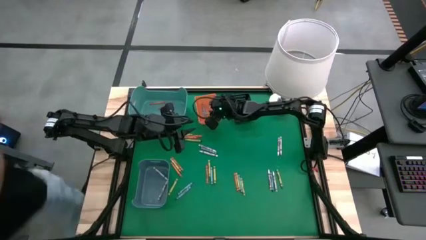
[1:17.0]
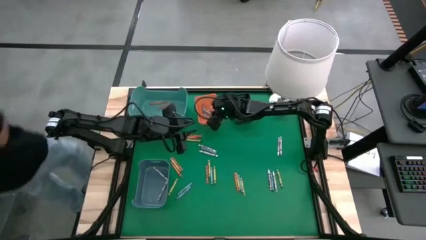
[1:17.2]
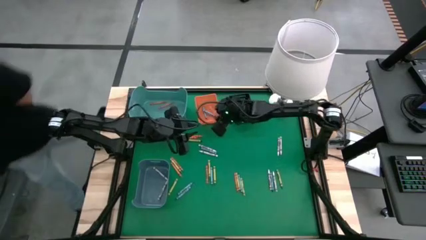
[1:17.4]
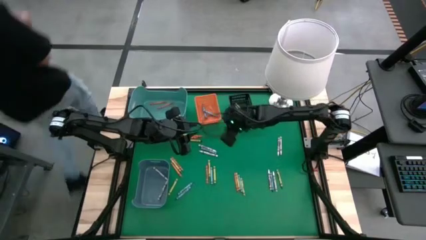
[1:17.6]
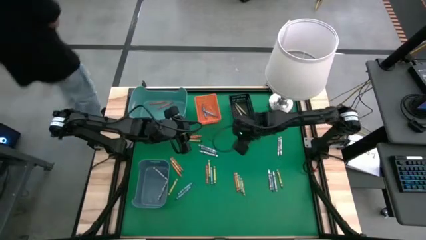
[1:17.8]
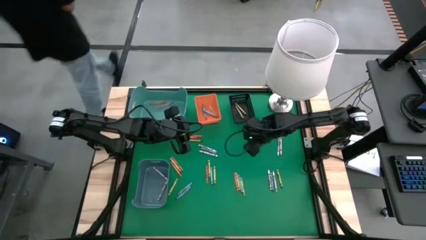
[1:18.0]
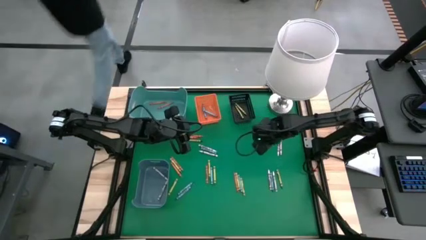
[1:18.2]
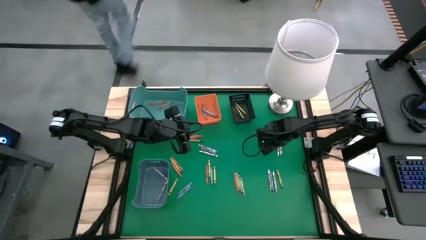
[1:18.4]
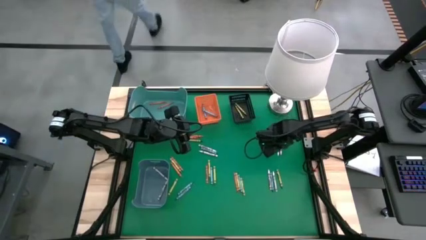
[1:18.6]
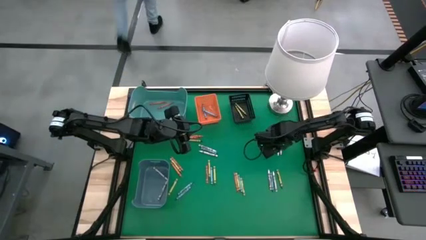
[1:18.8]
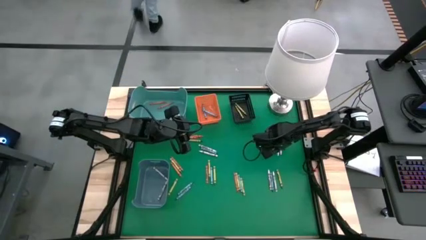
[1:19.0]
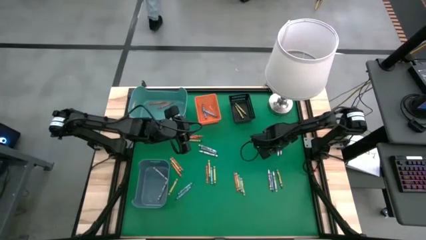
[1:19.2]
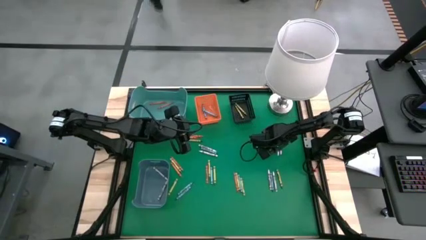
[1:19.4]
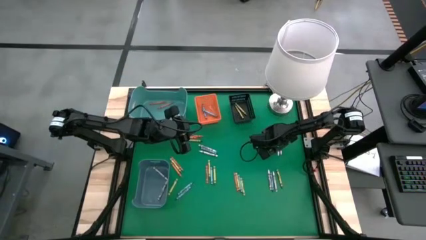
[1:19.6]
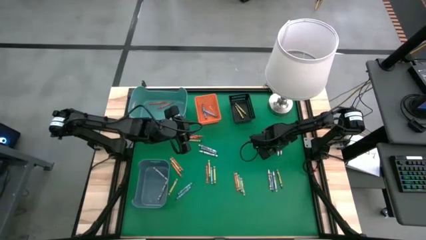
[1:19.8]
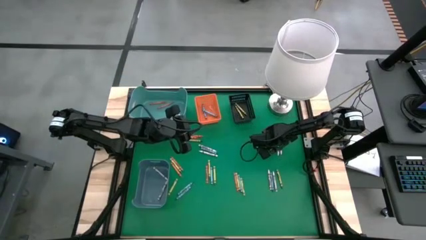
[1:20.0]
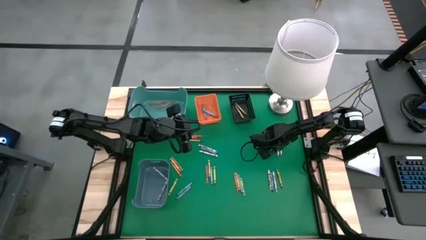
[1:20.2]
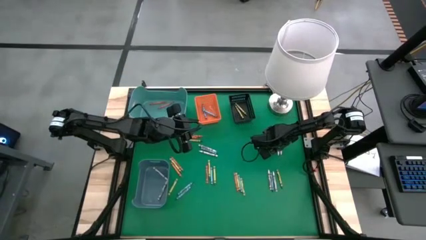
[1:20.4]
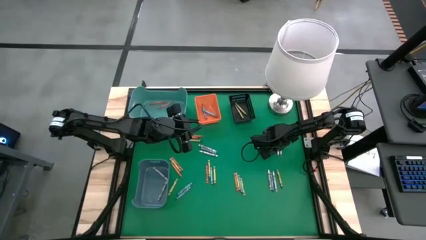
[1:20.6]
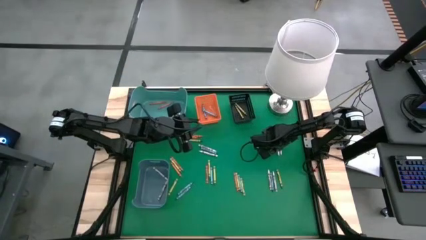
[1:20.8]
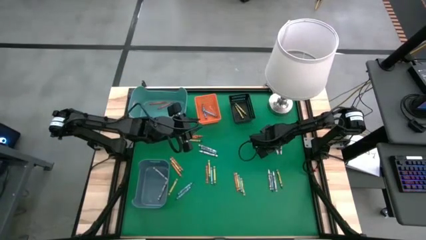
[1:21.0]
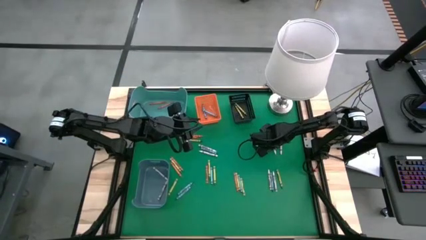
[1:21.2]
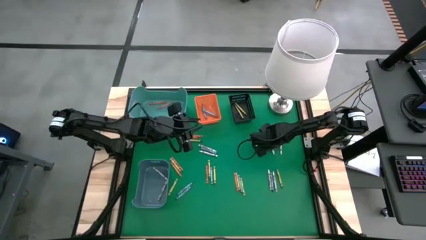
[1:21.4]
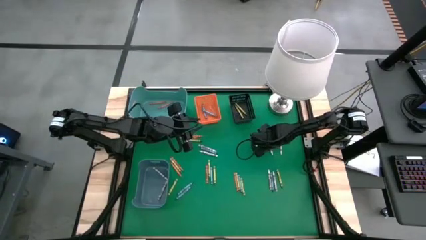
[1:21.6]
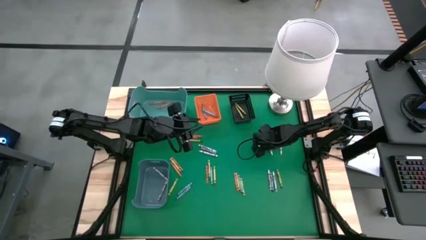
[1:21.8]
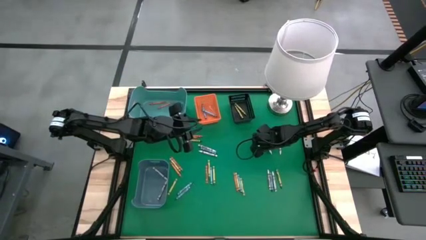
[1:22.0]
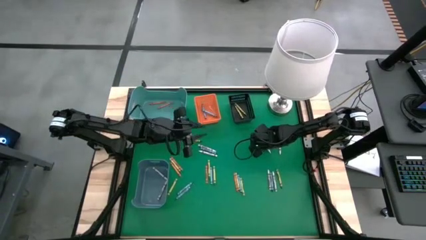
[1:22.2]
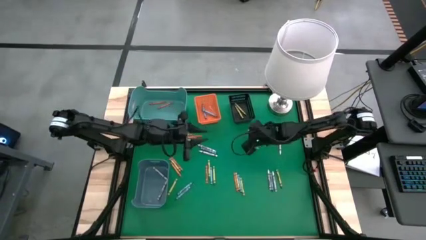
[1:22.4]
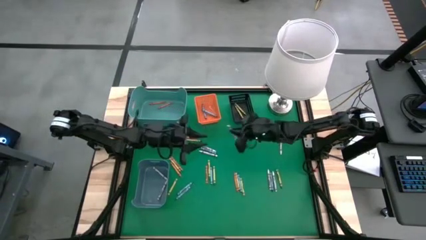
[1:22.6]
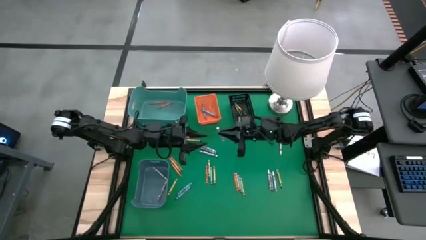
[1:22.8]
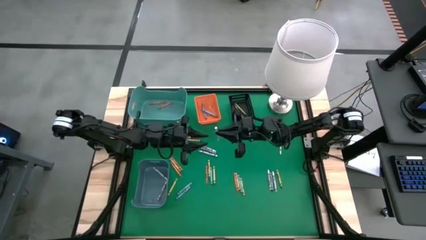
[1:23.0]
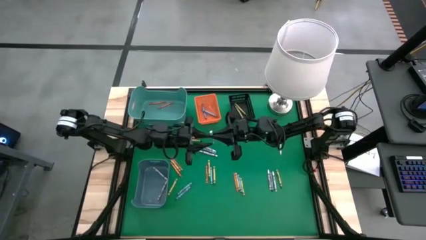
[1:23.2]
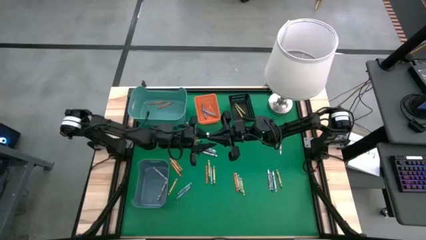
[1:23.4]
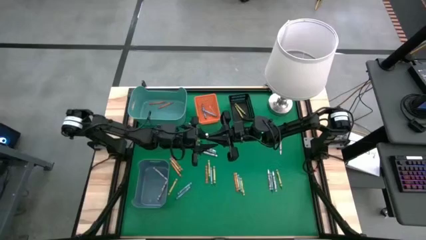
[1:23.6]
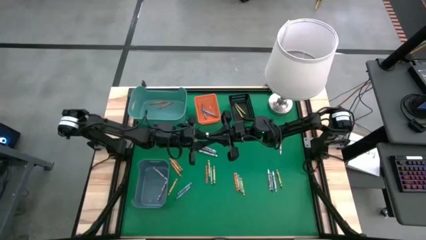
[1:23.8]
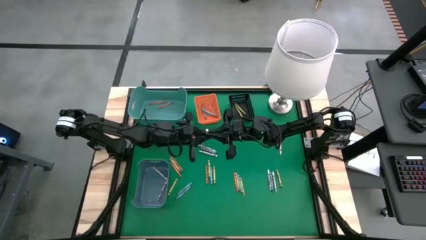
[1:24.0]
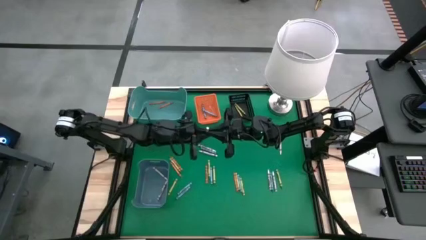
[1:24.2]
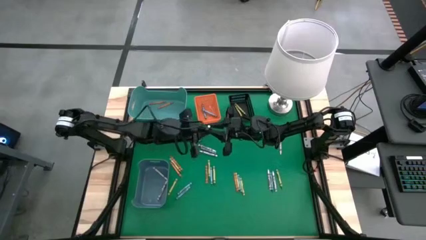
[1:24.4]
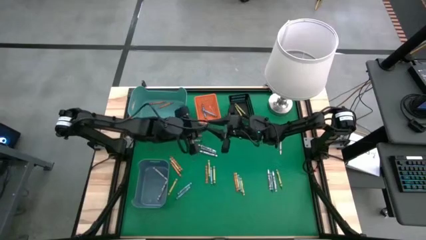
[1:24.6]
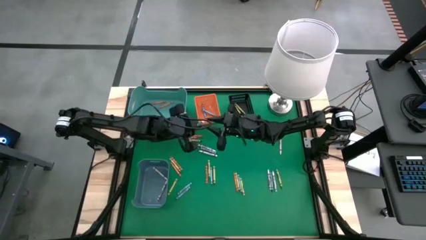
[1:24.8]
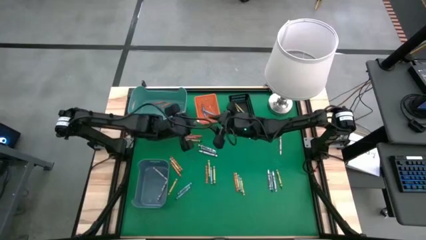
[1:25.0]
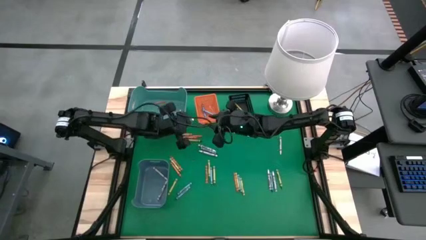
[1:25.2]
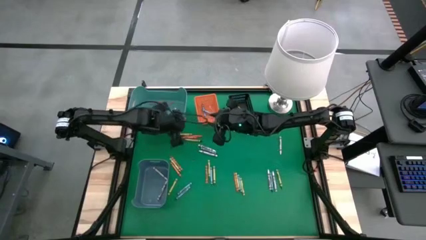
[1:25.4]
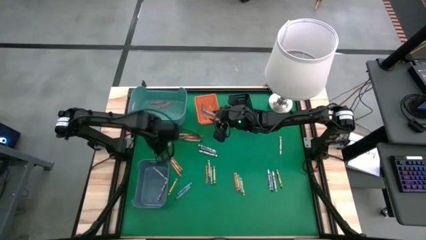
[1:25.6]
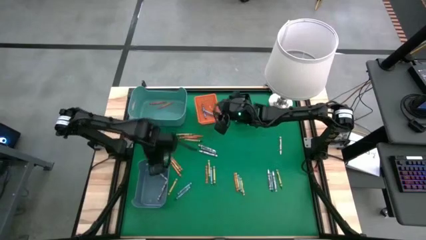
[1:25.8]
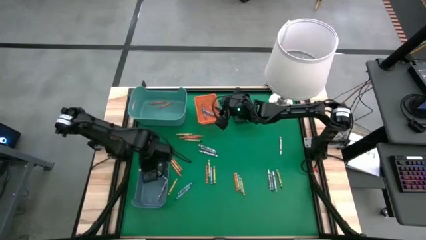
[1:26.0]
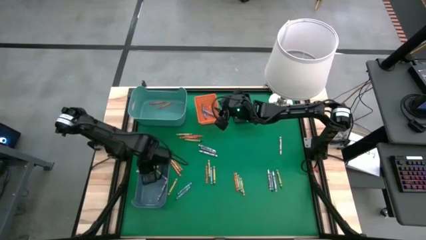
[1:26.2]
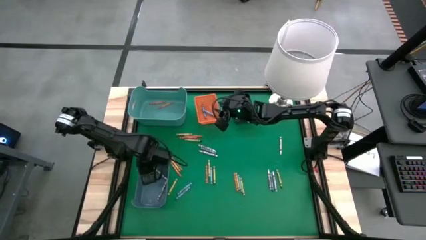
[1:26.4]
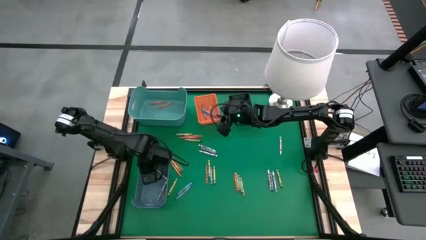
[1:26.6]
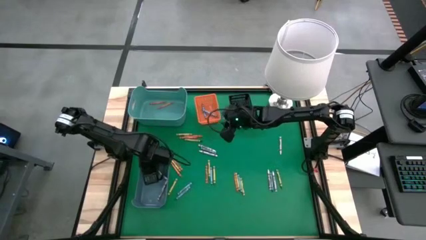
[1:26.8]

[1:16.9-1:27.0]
Task: Sort crayons
Put the white crayon into the blue bin

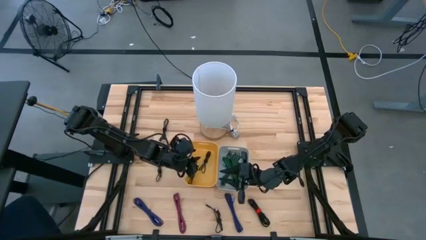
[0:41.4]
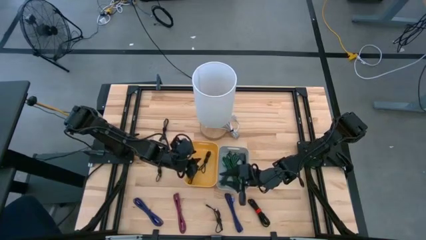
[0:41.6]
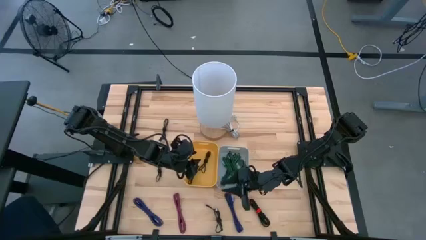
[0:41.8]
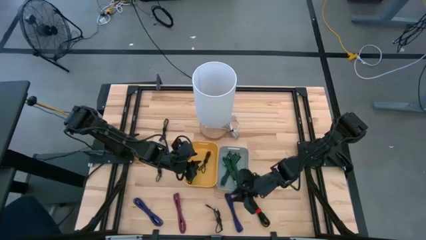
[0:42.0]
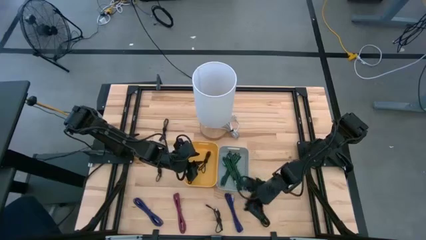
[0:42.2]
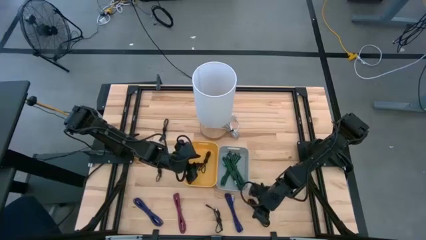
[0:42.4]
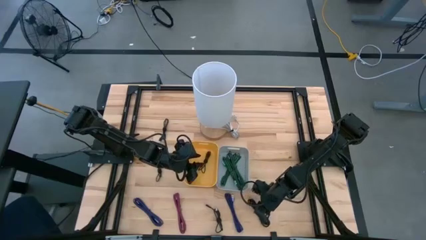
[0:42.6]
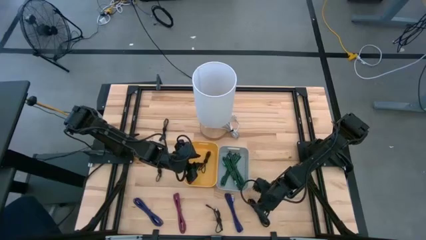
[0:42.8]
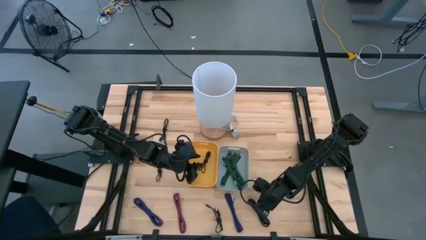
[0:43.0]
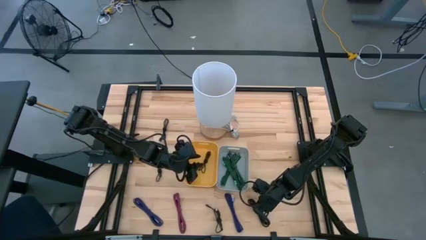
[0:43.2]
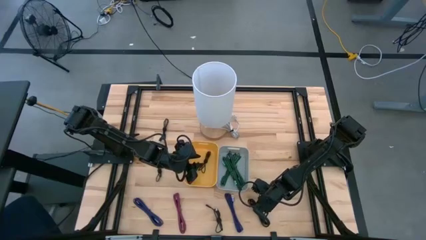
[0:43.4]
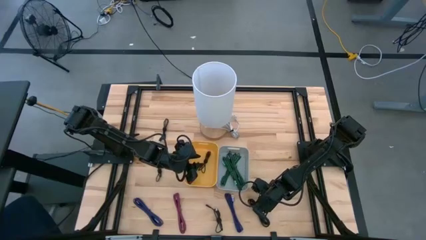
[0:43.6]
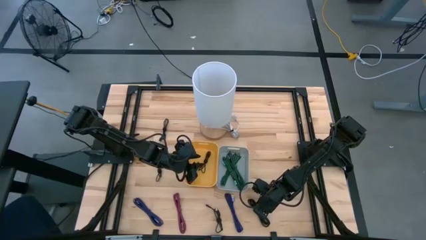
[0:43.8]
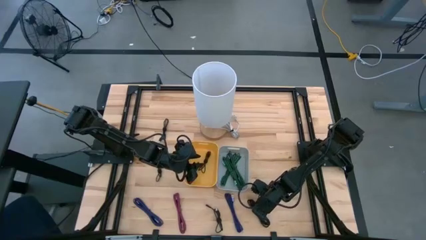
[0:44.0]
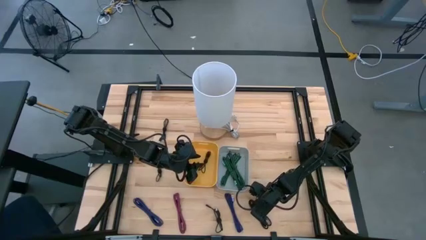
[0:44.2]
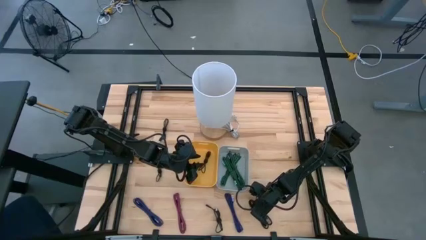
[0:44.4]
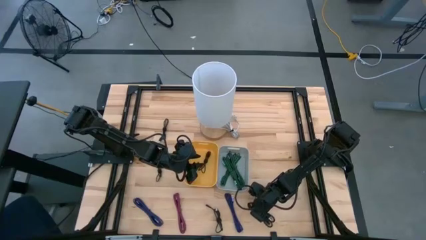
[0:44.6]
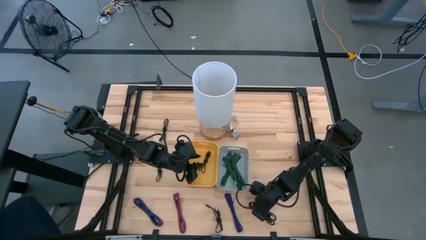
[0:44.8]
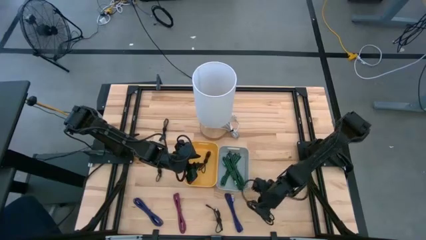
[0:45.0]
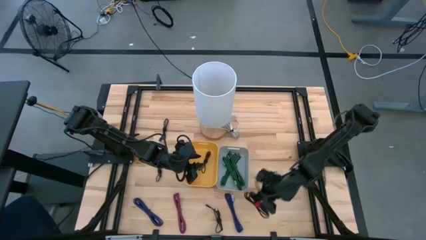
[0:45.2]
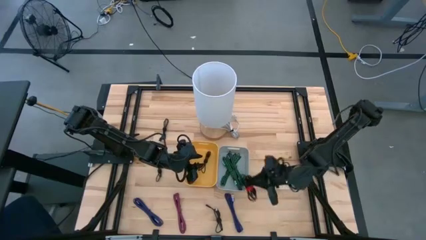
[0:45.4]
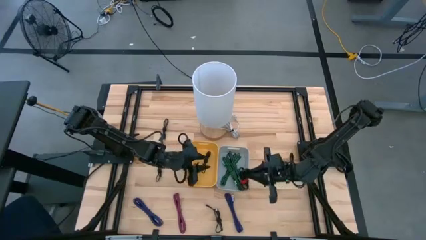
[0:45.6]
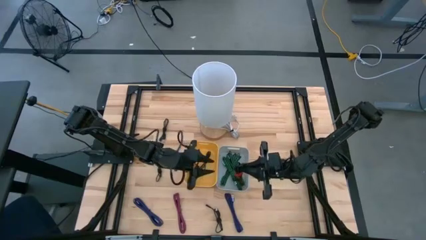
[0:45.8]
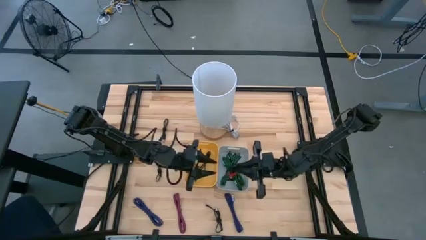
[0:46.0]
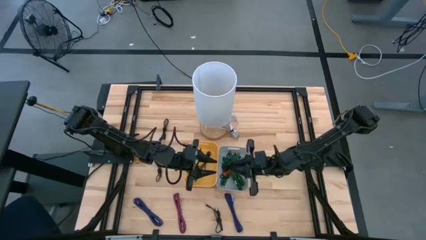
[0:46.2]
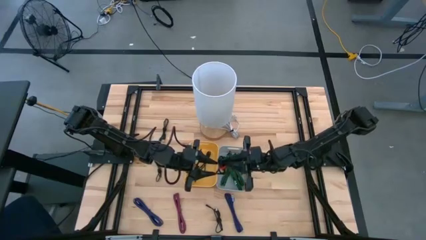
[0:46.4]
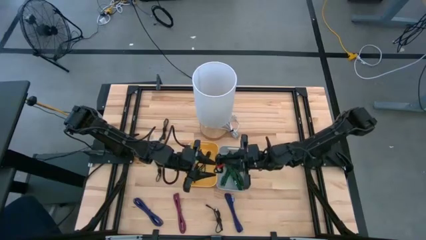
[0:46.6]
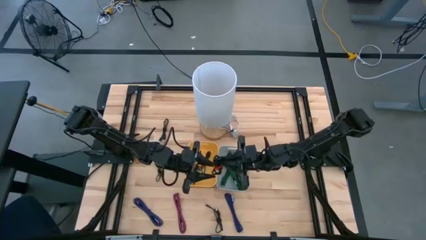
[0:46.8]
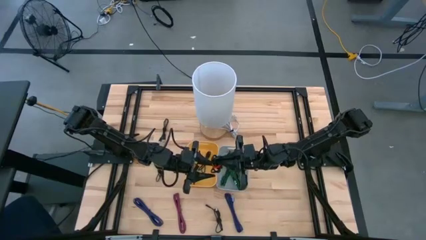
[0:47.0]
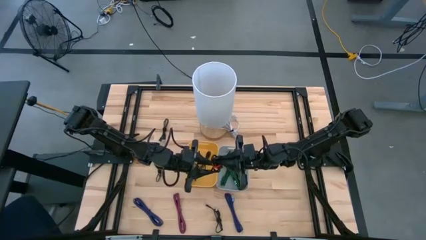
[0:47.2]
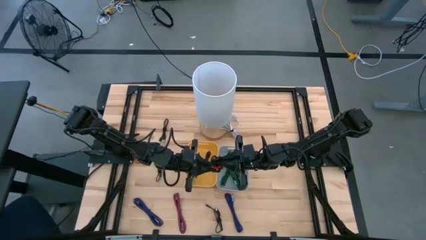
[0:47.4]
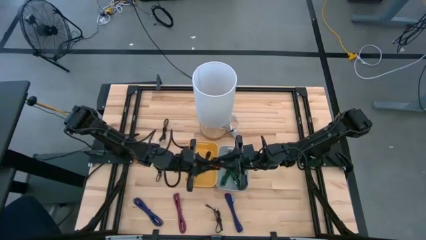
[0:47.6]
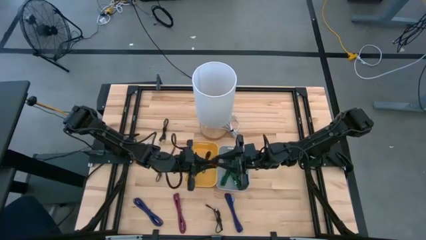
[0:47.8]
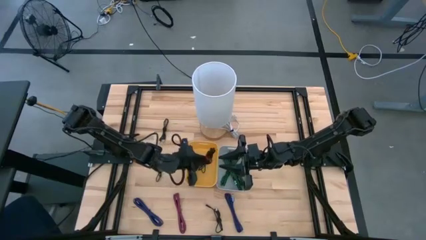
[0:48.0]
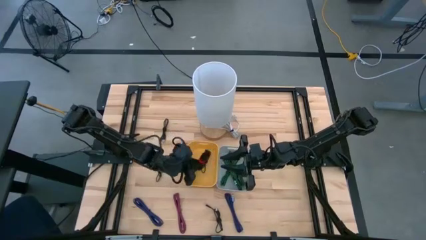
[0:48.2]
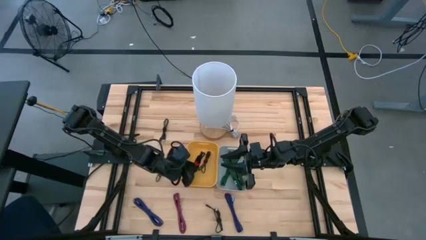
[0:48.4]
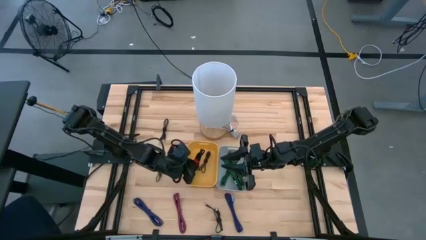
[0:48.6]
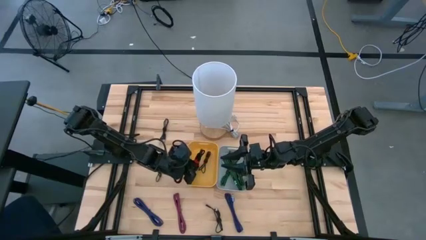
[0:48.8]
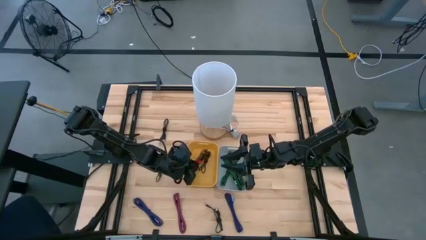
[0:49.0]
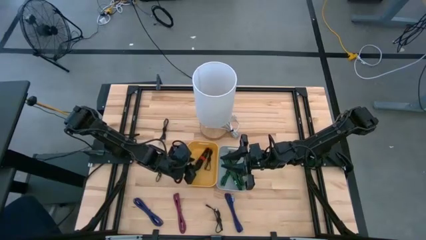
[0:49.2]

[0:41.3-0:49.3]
Task: Pick & Place USB Port
Put the black charger cable into the yellow bin
